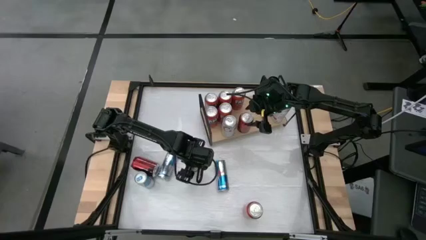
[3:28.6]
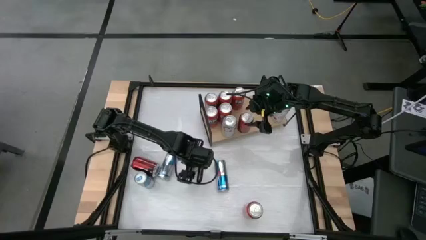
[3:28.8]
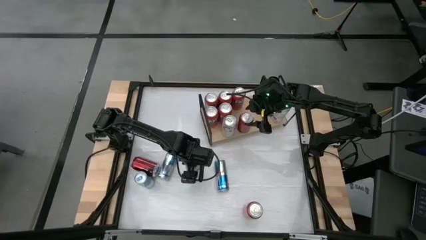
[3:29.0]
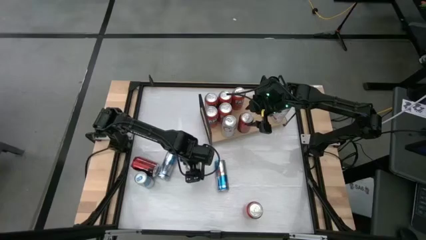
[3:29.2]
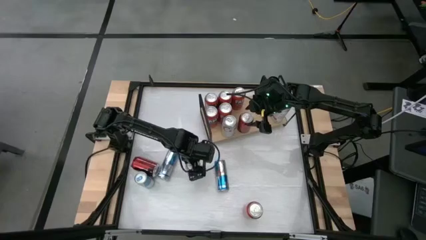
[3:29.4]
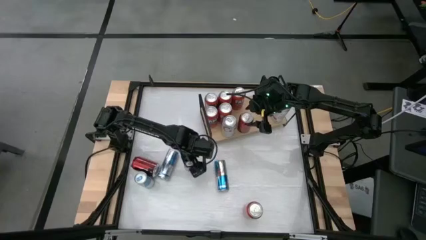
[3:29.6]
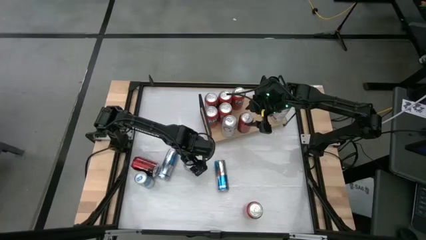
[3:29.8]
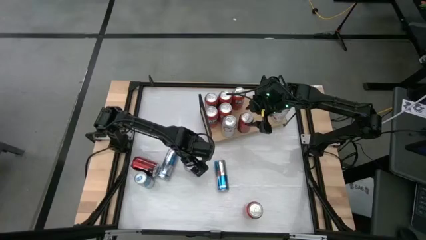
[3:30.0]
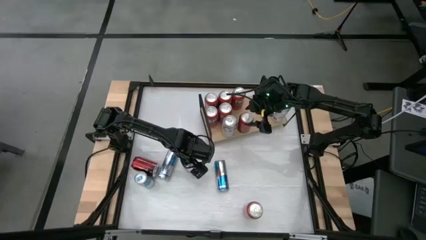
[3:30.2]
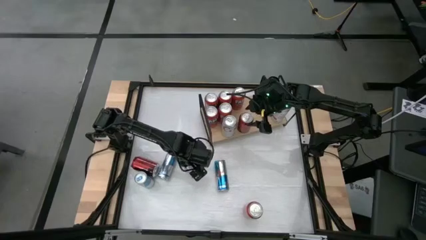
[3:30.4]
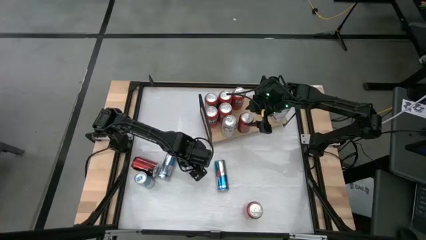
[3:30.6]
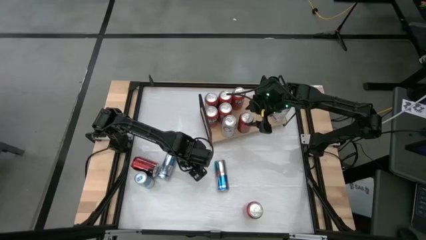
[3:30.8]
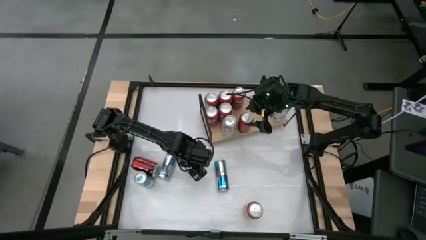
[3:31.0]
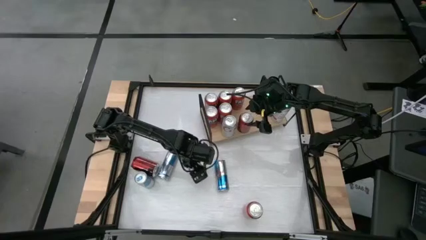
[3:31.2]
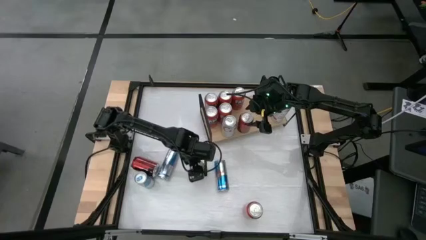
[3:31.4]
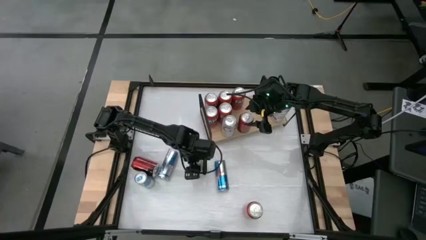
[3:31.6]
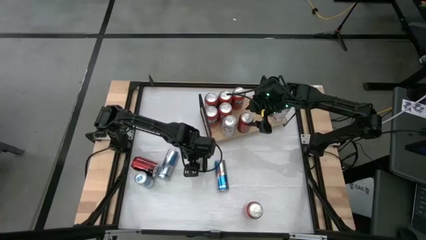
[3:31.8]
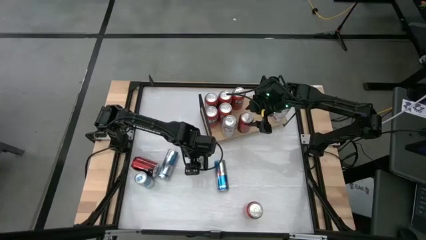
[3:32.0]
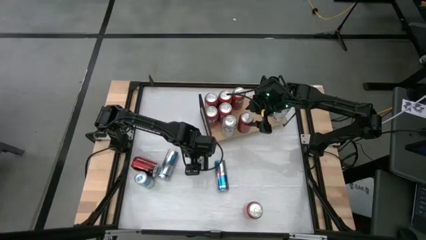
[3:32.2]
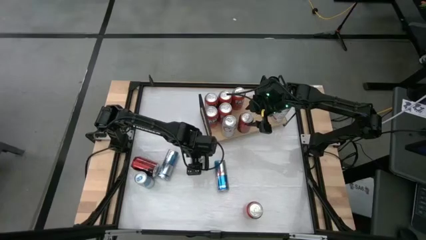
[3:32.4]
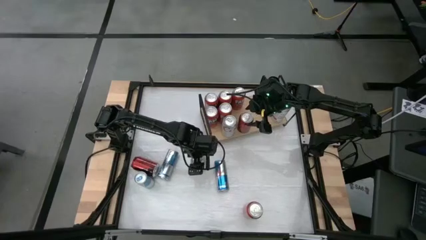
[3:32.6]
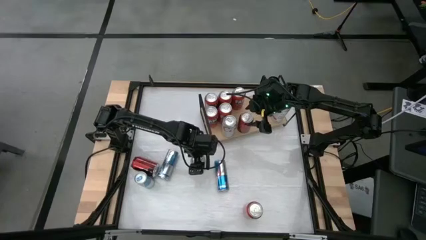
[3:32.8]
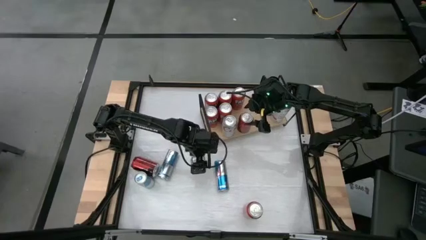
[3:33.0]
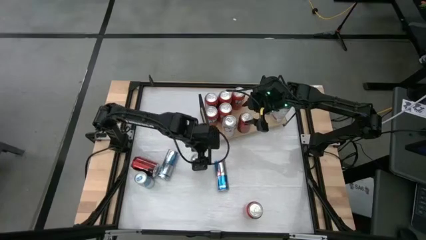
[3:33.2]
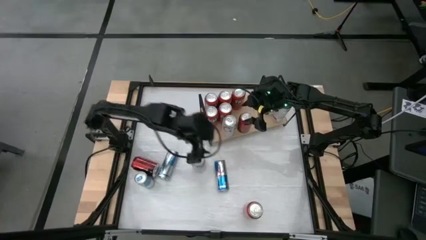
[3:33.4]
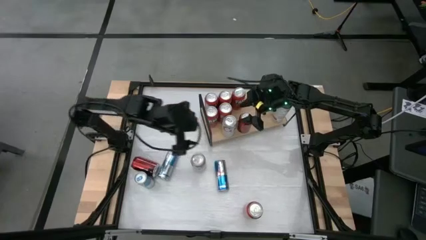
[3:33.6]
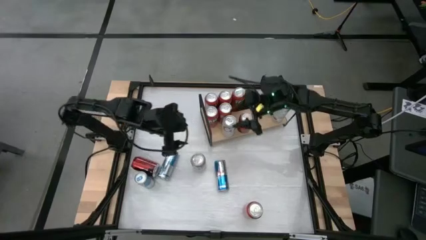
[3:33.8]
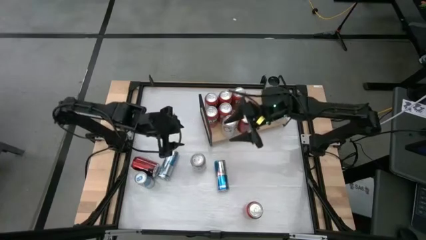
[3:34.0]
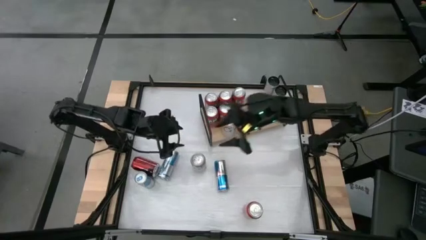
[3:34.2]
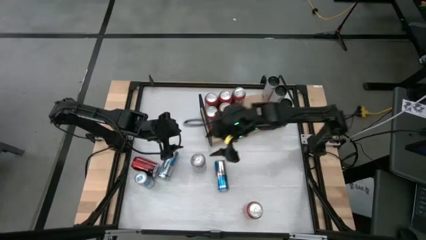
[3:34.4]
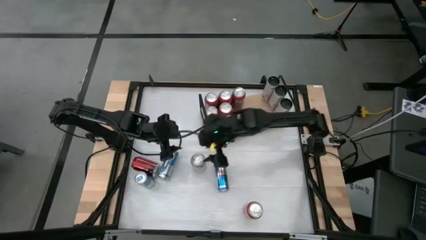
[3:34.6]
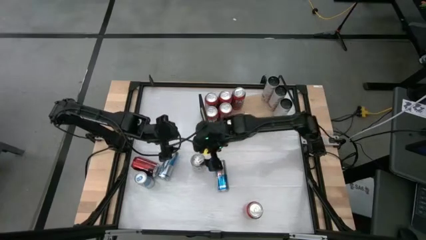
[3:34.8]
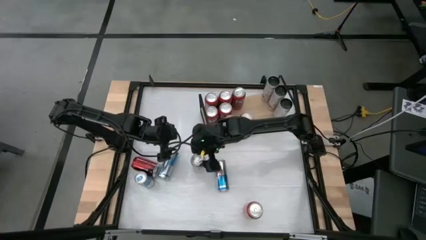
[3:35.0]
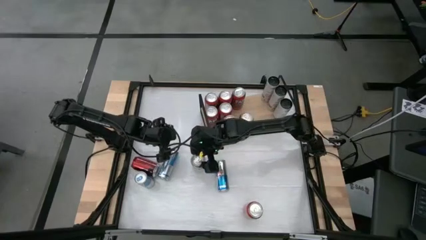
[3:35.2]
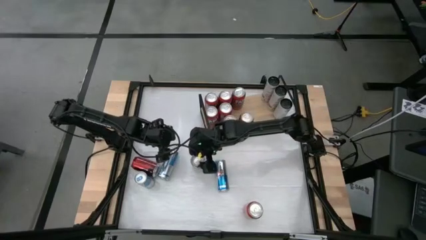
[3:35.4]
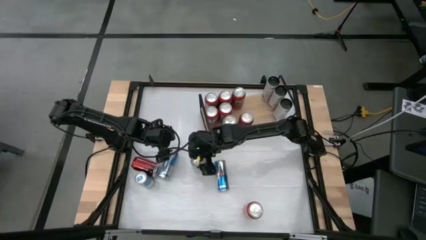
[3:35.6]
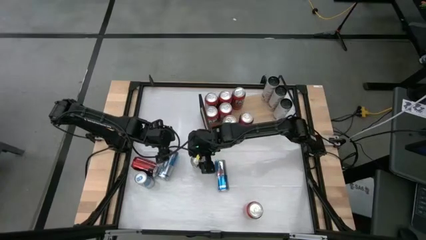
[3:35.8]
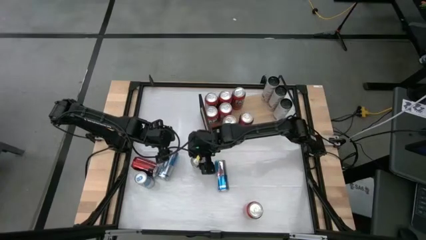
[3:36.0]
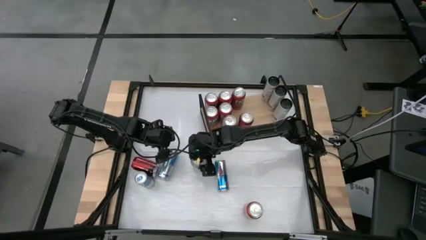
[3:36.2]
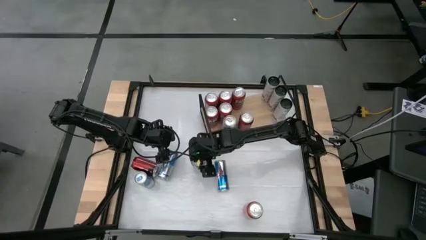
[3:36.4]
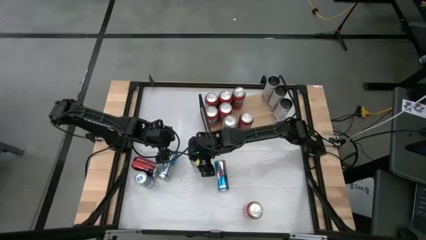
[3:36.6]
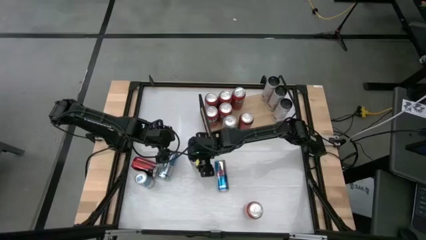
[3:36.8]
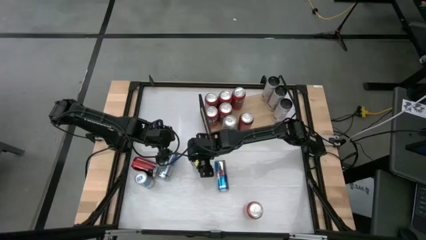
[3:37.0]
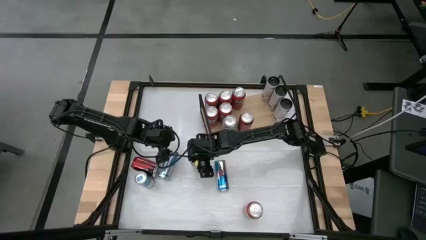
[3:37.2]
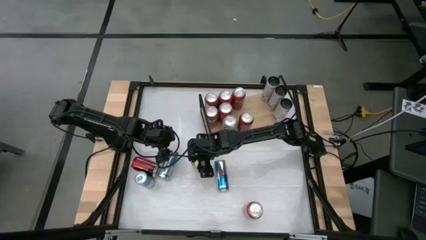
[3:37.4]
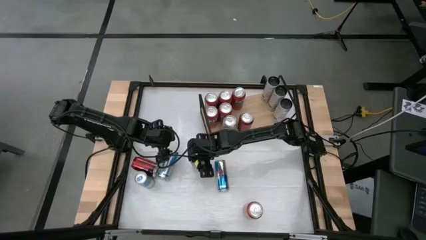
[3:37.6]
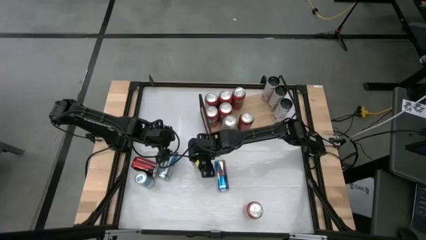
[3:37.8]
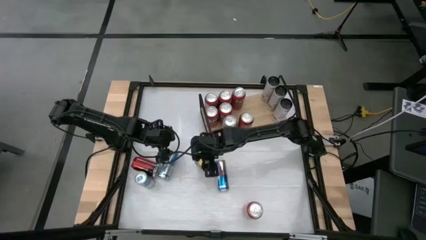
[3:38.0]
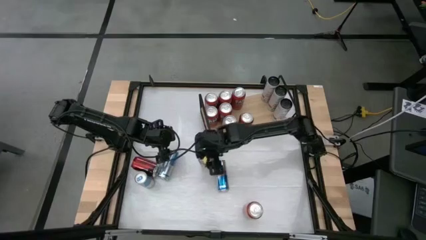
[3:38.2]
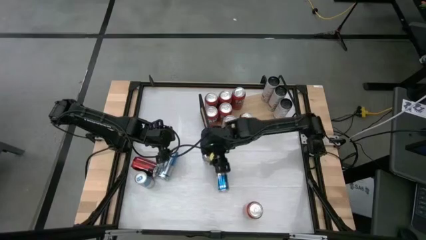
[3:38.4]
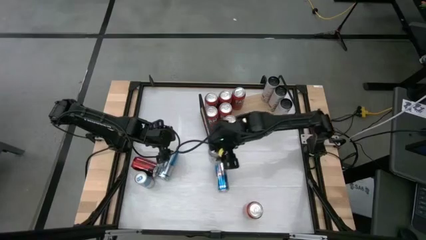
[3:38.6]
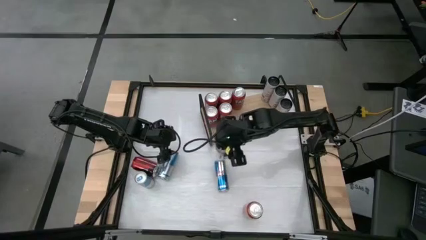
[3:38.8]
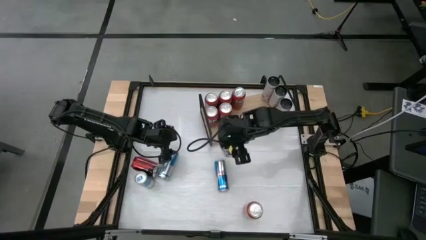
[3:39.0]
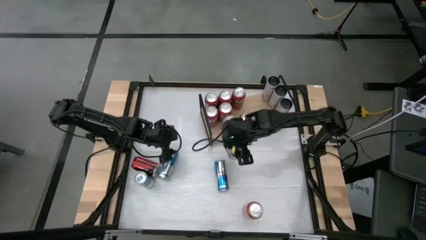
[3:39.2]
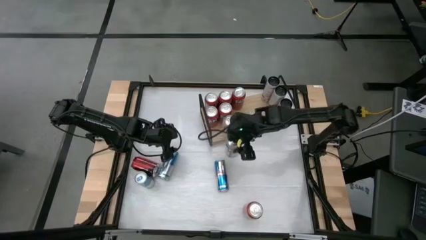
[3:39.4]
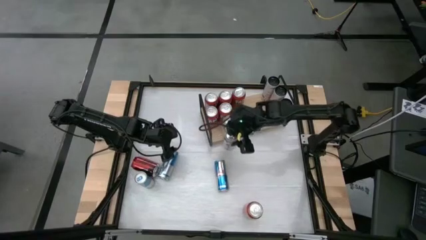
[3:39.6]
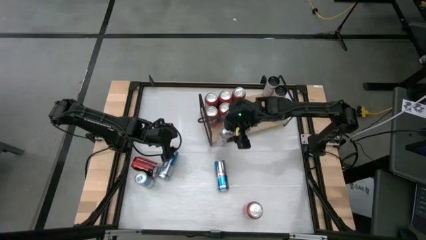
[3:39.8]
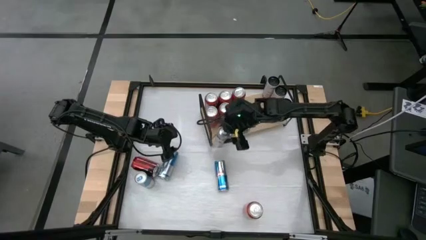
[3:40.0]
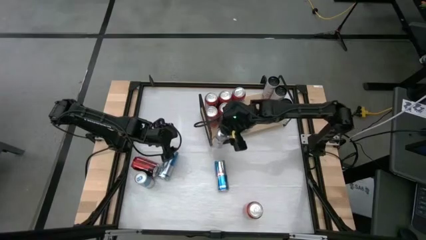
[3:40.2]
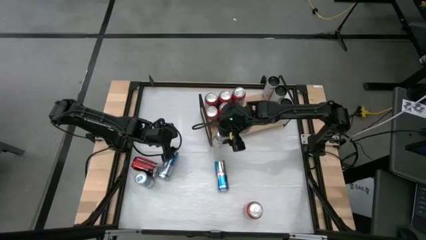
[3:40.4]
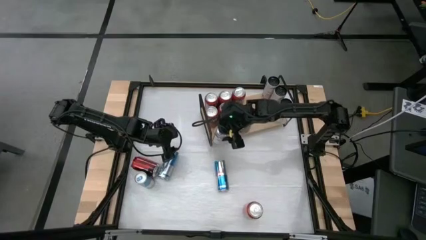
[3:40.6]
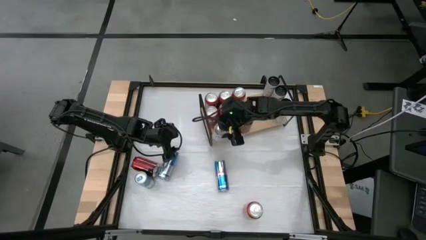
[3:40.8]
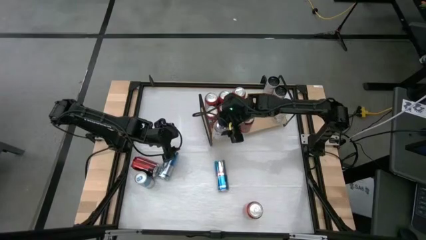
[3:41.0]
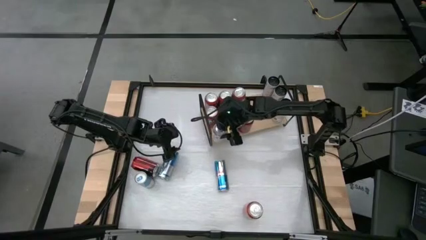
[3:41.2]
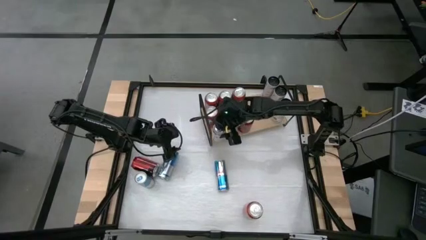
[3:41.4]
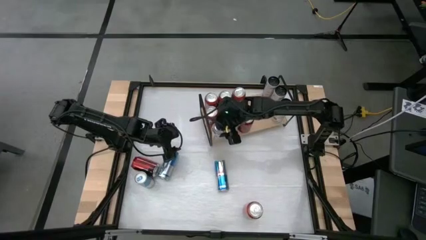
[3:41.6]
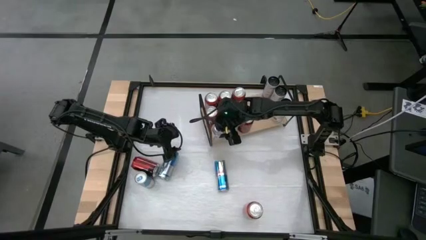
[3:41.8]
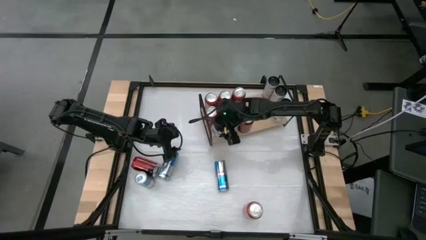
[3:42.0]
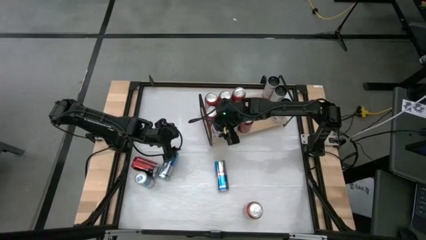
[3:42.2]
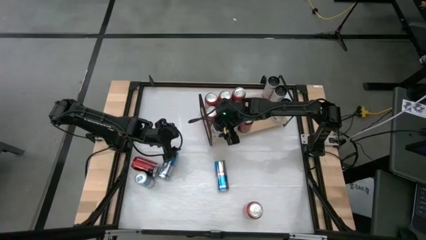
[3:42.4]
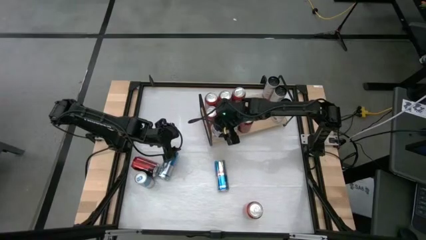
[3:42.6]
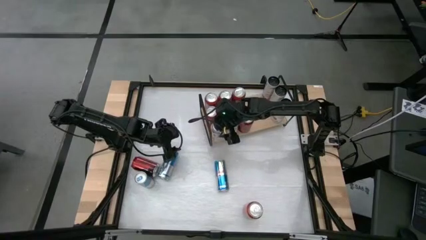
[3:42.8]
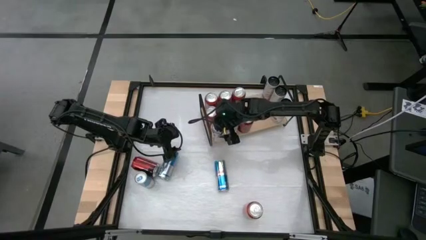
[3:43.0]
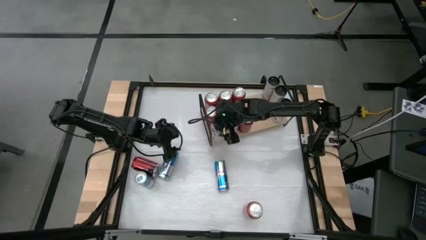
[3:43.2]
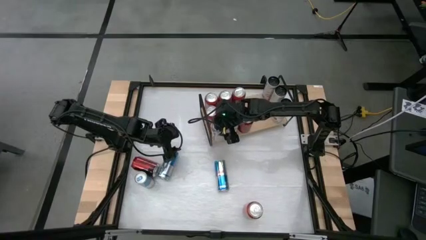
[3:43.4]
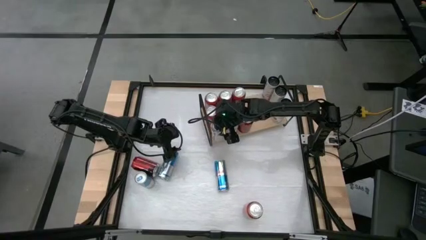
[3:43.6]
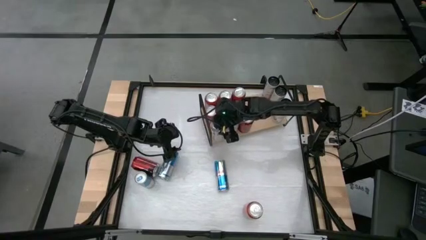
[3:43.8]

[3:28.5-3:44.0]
Task: Place canned beverage on shelf
Put the white soda can on the shelf
